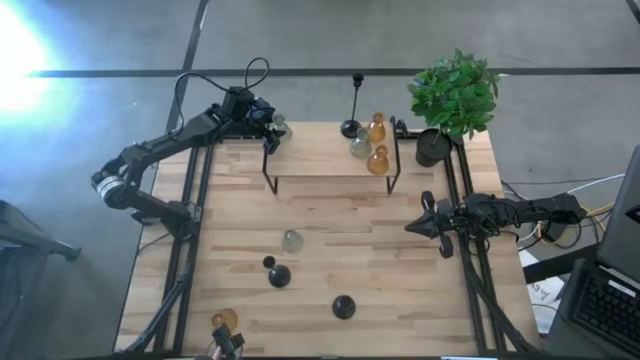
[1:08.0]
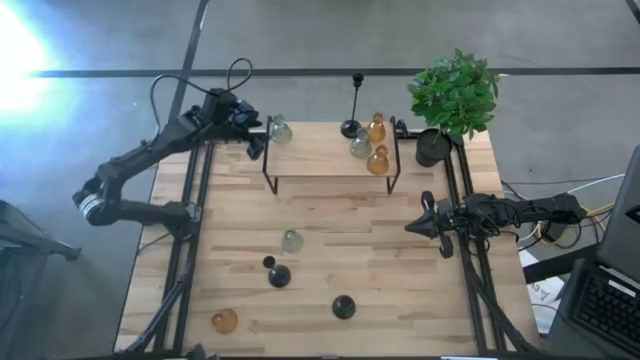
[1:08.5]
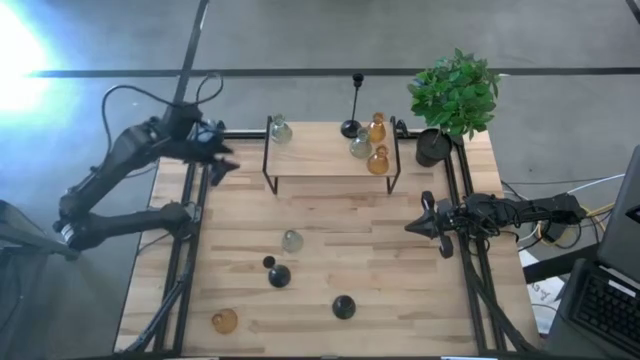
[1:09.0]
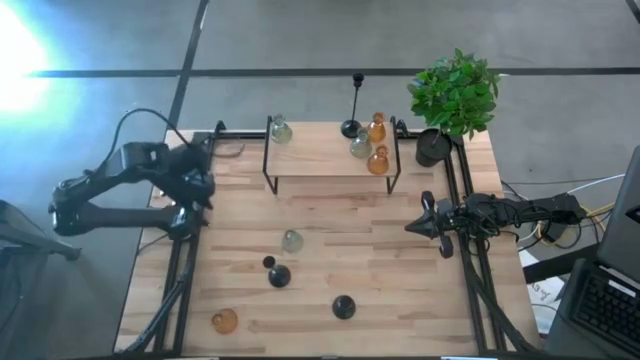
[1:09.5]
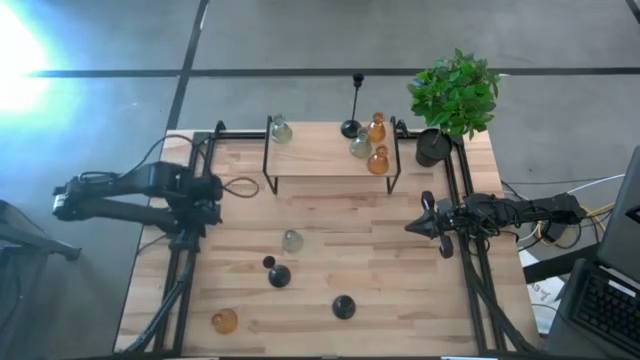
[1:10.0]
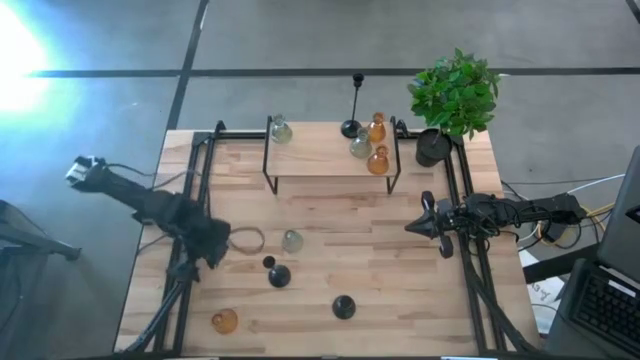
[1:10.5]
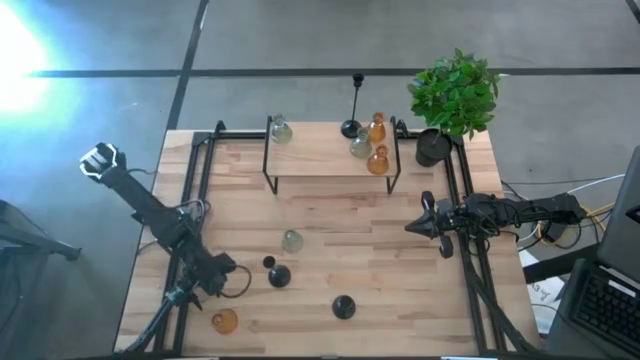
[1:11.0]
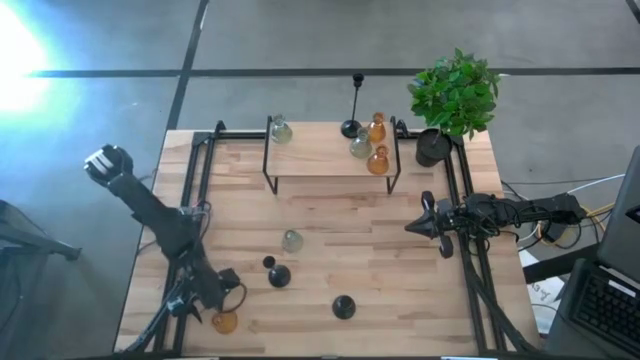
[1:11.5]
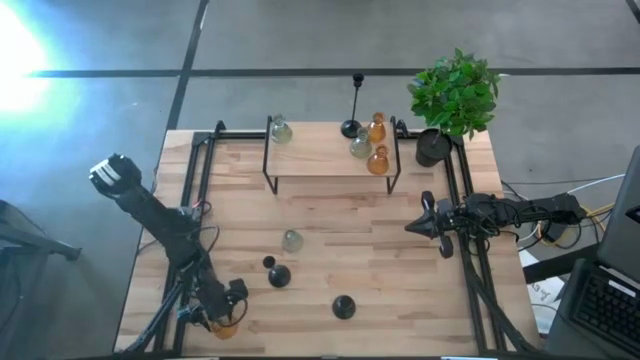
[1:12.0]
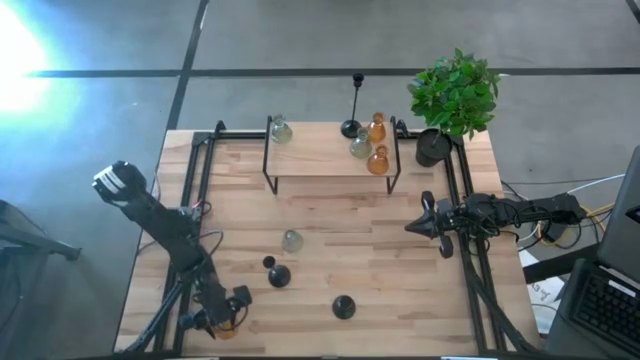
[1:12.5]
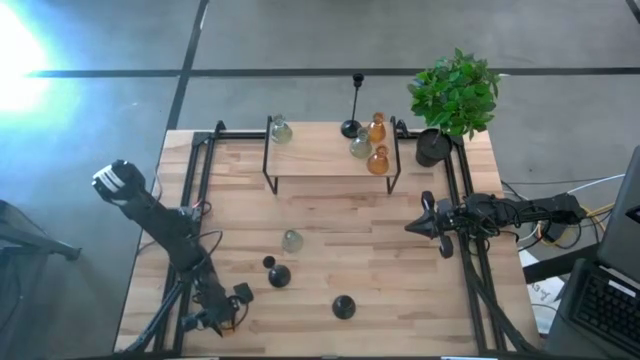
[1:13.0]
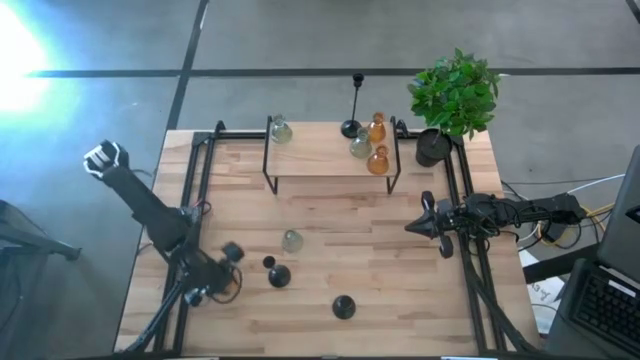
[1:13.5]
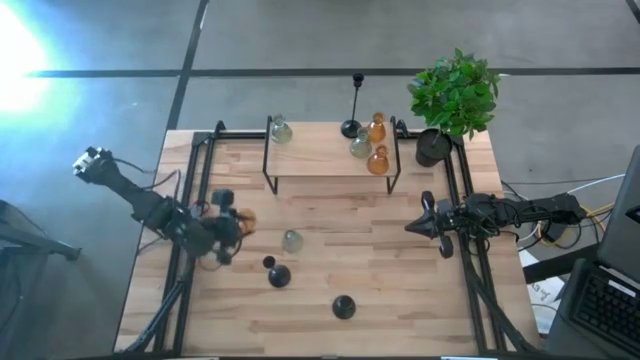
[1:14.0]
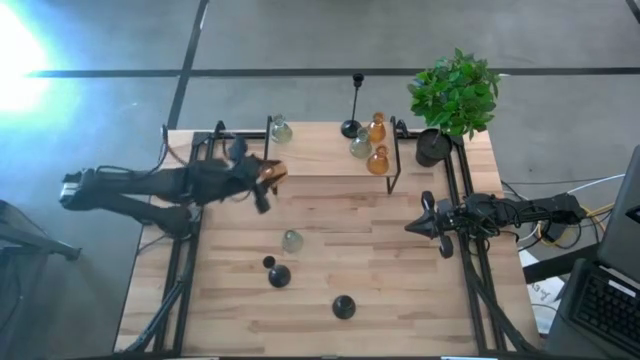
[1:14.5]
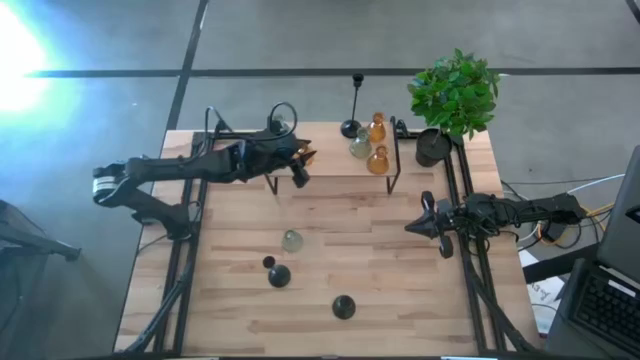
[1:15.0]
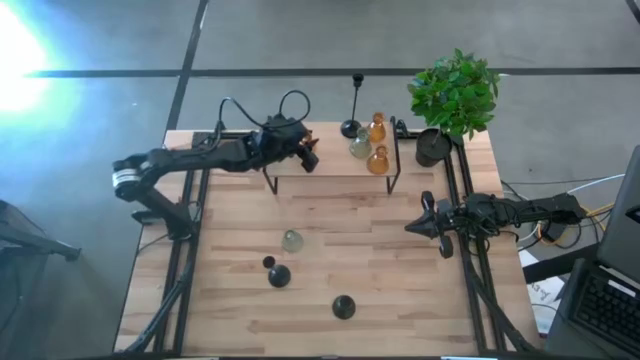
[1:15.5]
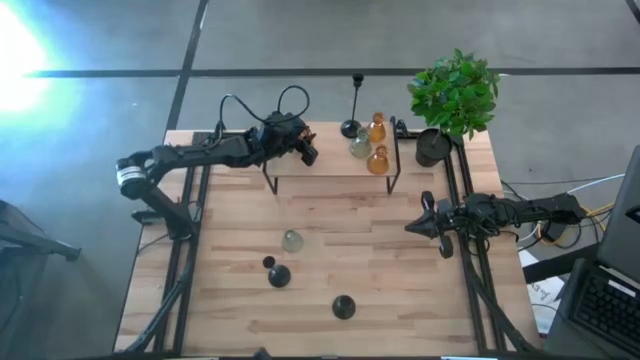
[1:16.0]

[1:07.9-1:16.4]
Task: Pick & Place candle stick holders
Put the orange candle holder on the shelf

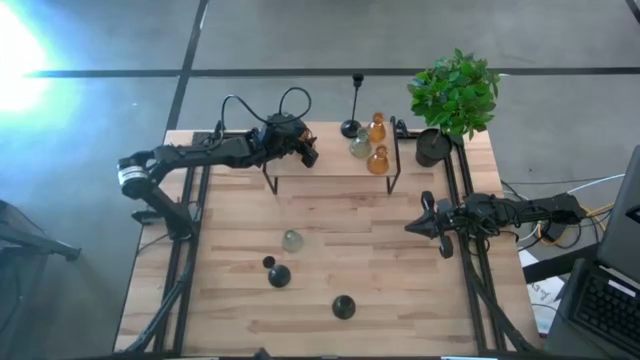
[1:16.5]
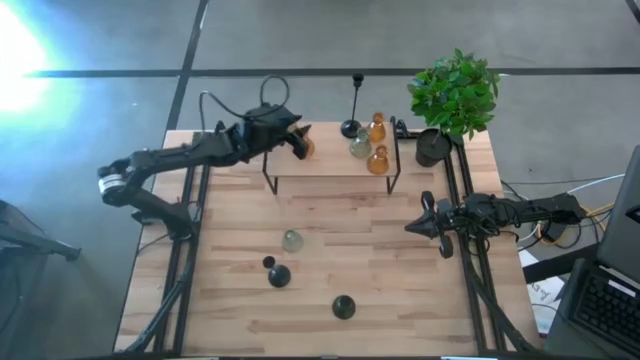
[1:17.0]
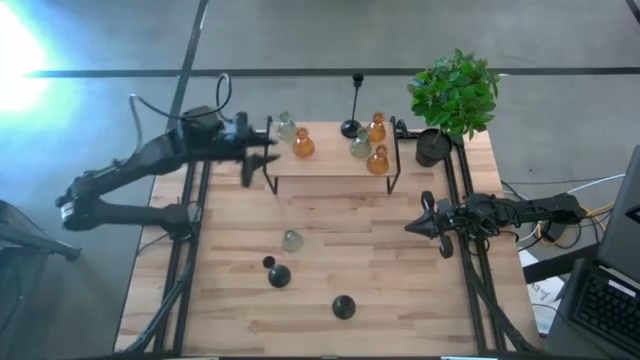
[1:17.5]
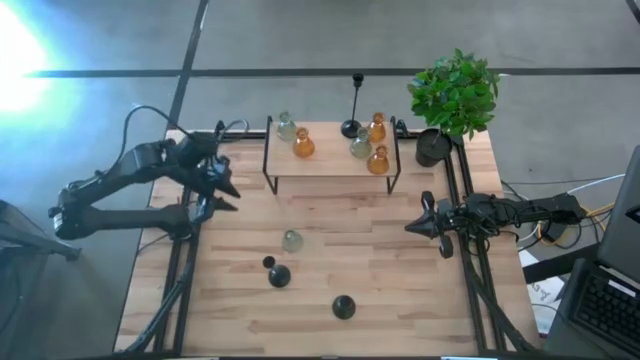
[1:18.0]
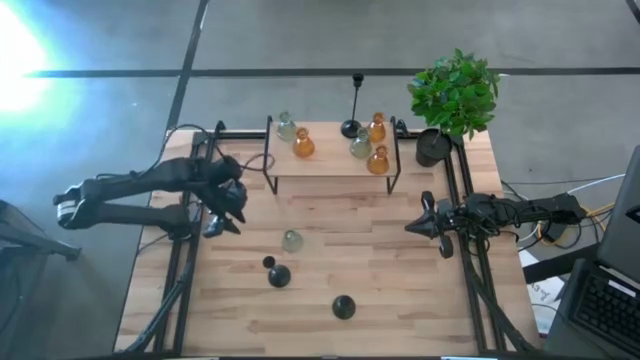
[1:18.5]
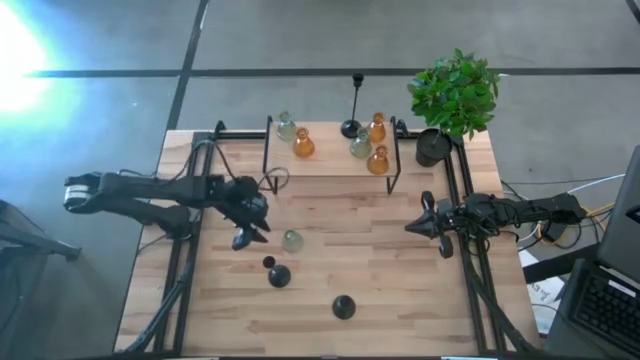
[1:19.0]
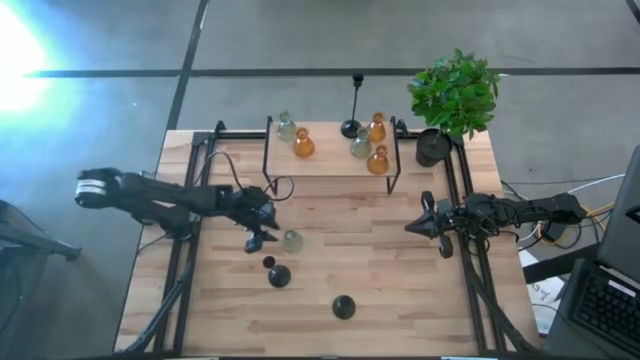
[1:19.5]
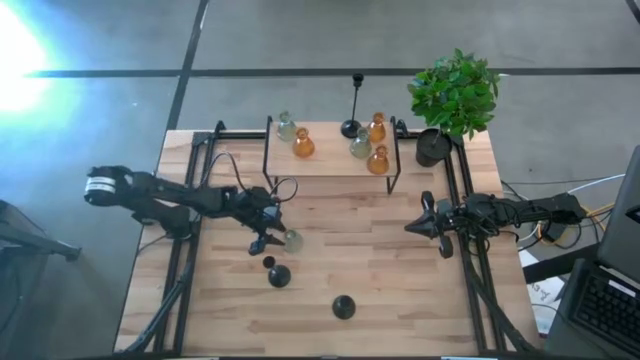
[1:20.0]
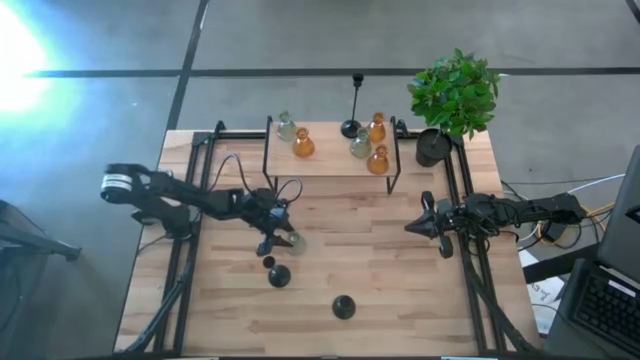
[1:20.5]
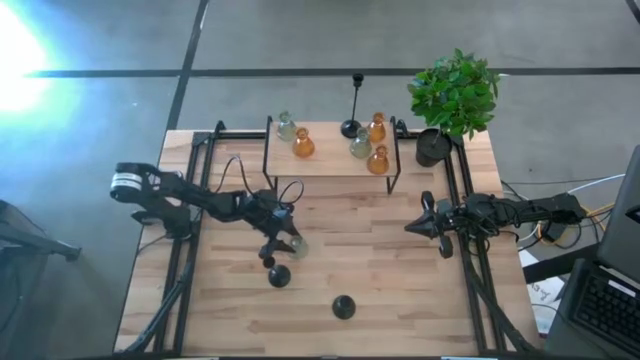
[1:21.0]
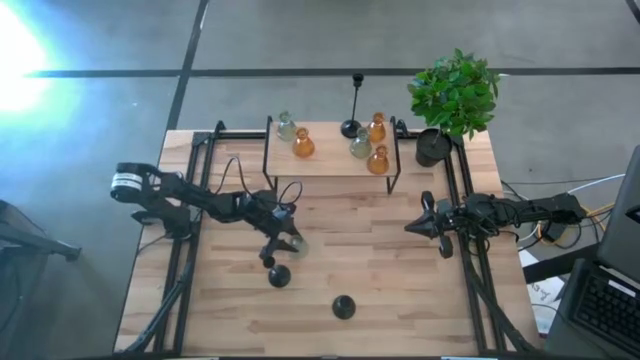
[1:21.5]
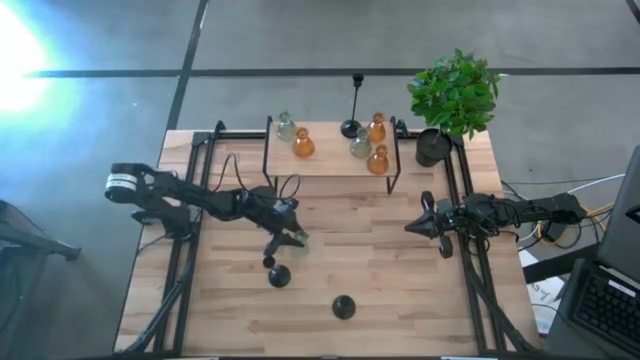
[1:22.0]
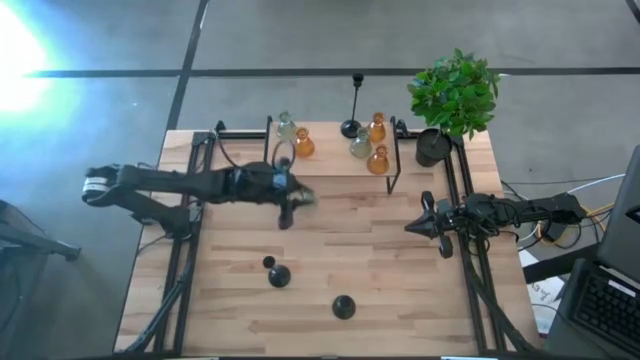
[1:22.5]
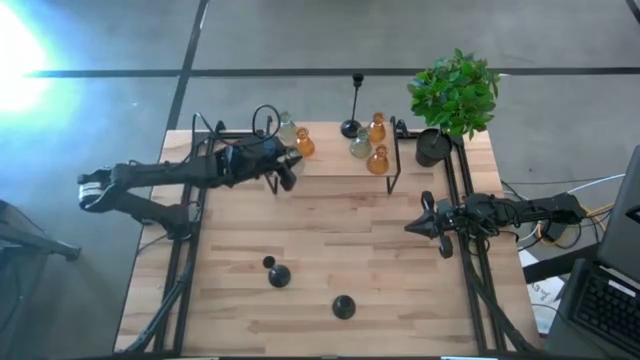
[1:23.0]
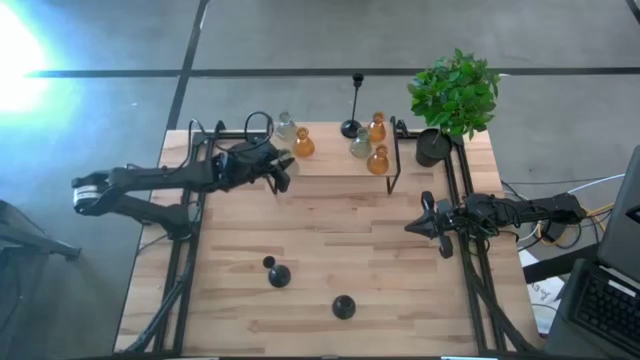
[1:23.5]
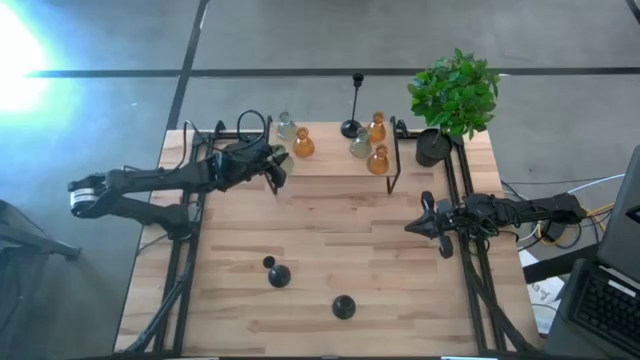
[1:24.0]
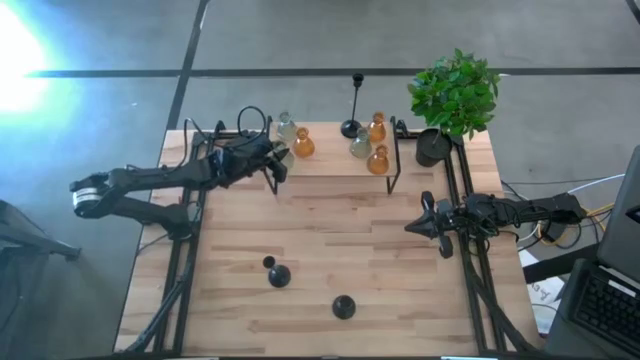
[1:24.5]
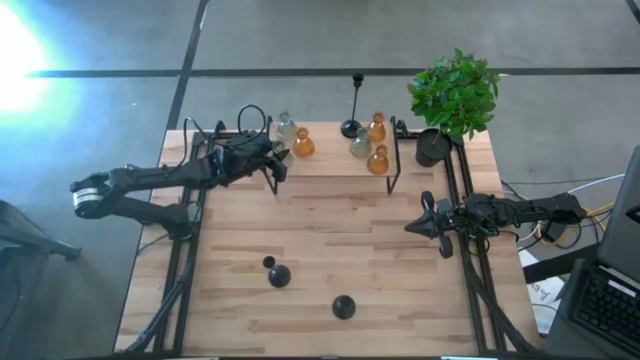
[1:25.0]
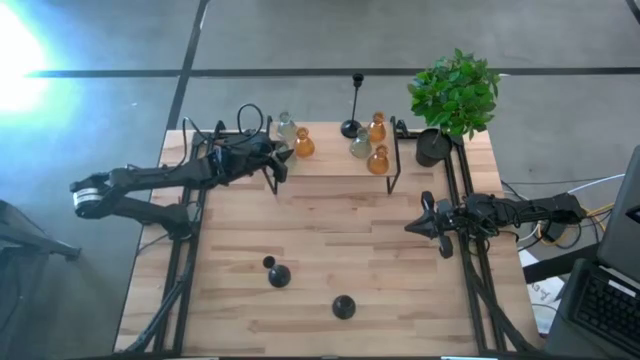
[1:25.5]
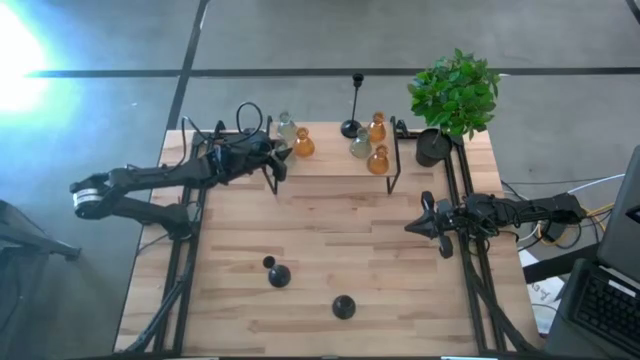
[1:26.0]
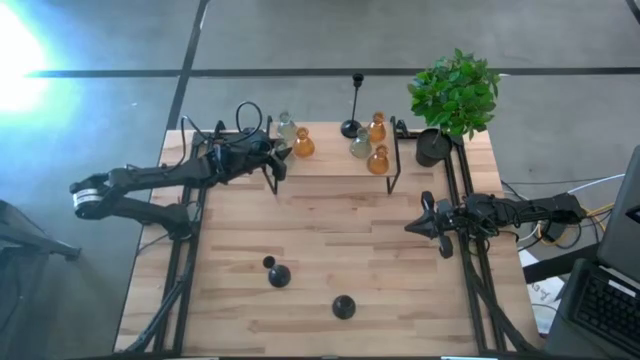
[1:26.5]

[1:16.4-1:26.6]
Put the green candle holder on the shelf
